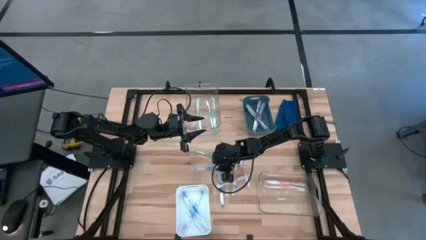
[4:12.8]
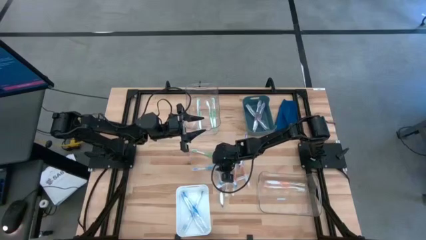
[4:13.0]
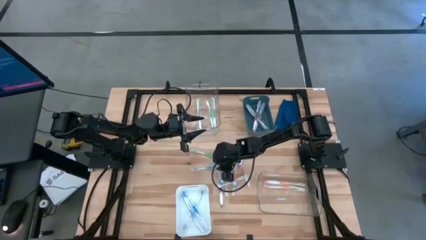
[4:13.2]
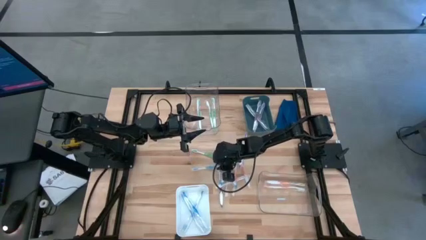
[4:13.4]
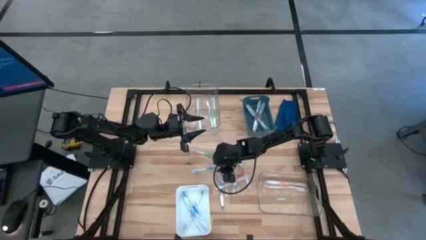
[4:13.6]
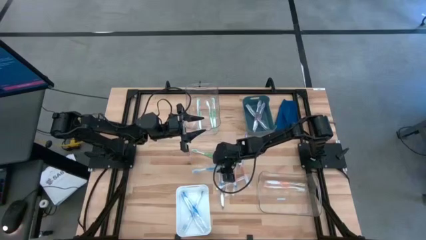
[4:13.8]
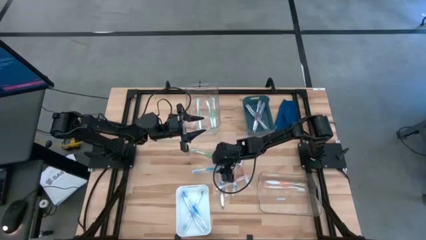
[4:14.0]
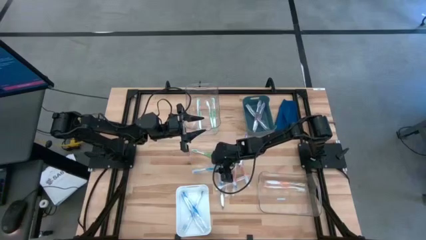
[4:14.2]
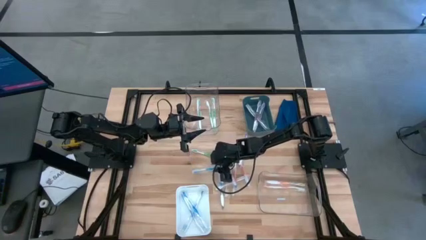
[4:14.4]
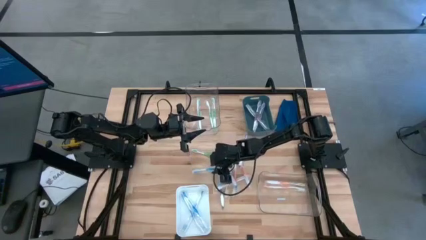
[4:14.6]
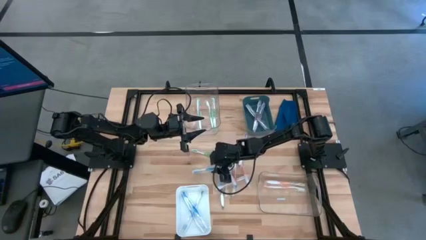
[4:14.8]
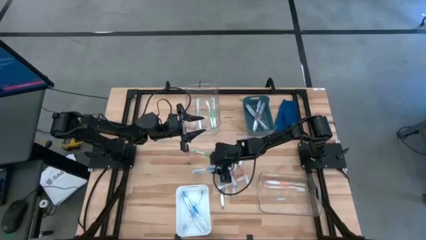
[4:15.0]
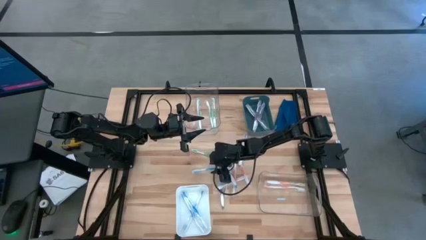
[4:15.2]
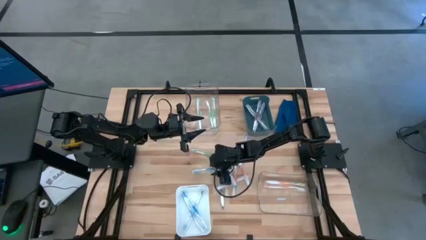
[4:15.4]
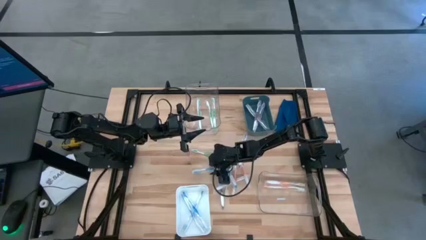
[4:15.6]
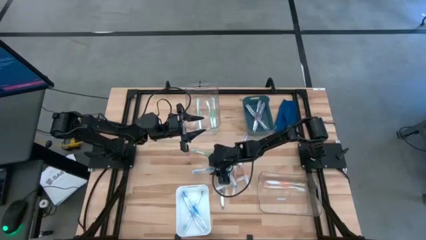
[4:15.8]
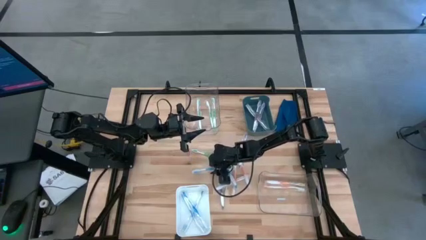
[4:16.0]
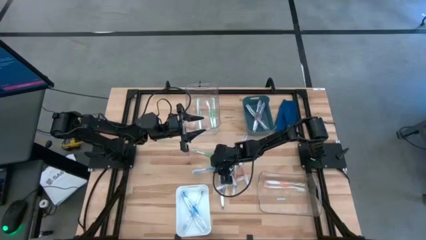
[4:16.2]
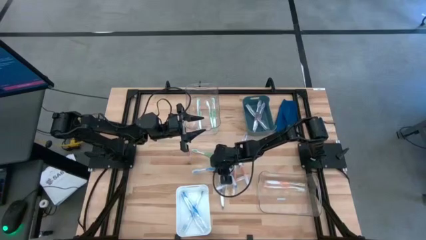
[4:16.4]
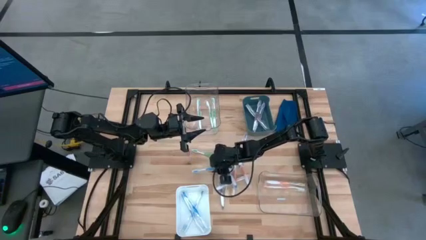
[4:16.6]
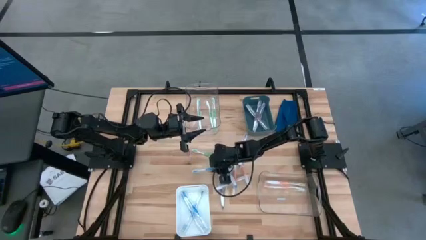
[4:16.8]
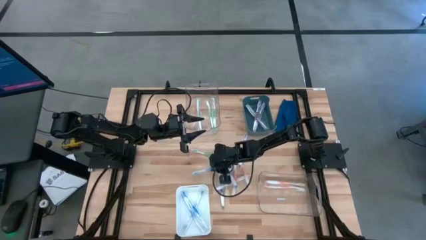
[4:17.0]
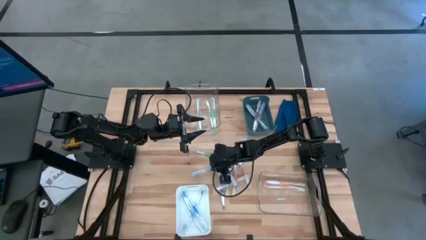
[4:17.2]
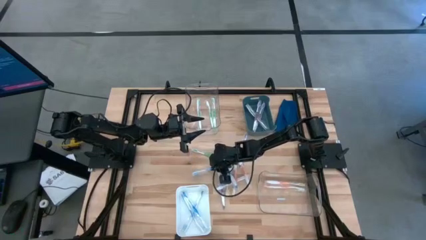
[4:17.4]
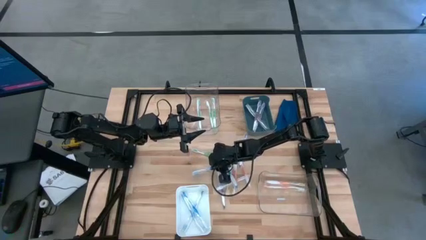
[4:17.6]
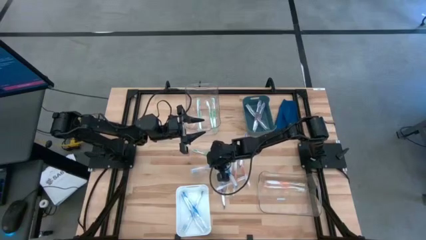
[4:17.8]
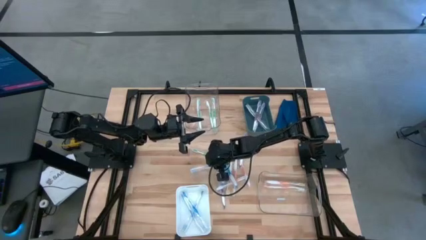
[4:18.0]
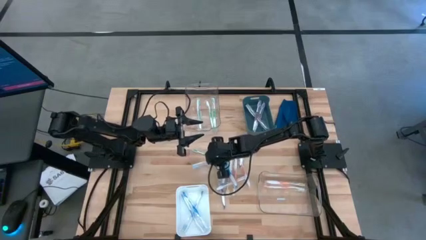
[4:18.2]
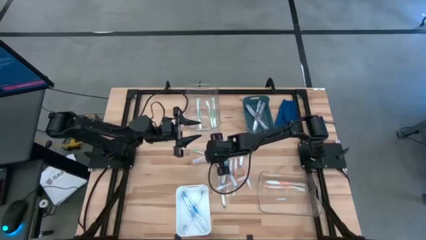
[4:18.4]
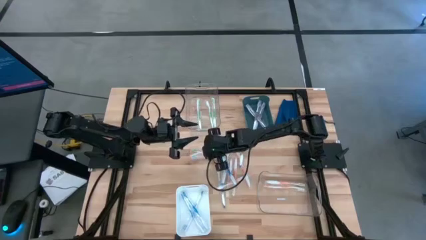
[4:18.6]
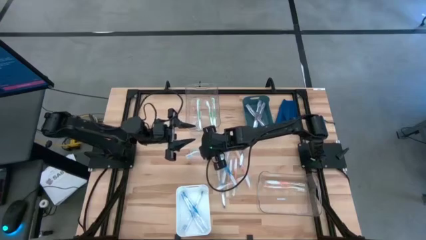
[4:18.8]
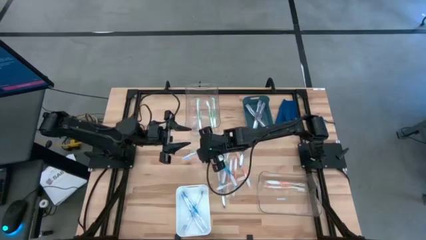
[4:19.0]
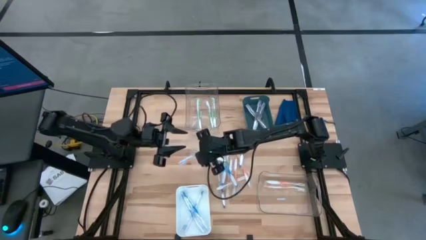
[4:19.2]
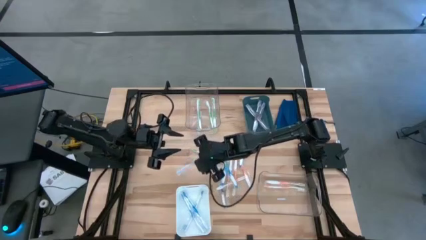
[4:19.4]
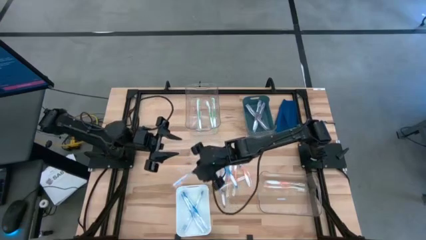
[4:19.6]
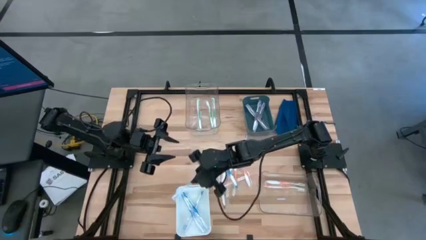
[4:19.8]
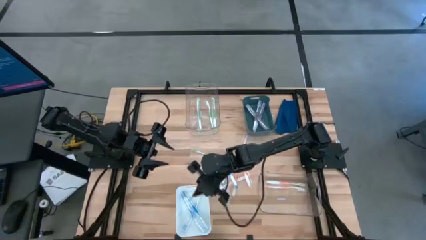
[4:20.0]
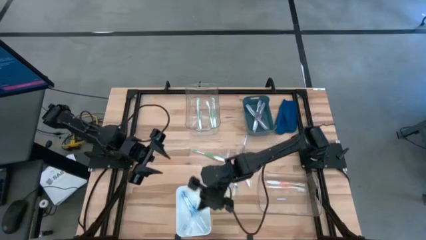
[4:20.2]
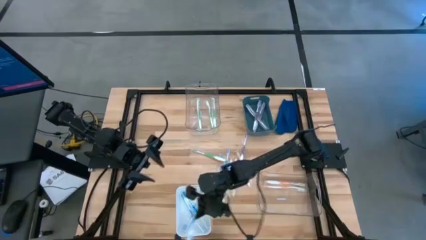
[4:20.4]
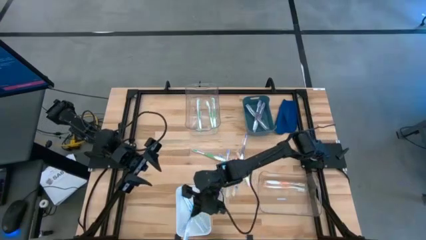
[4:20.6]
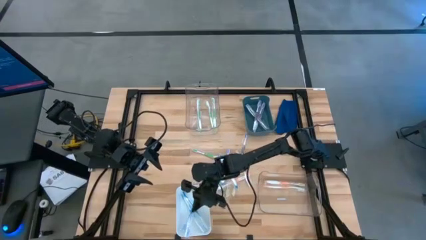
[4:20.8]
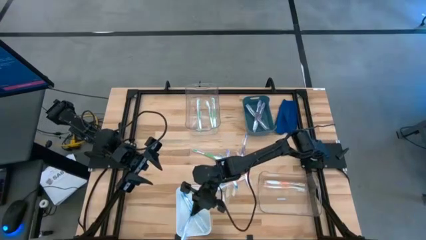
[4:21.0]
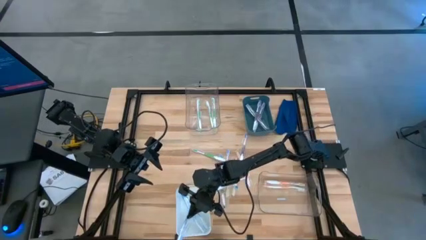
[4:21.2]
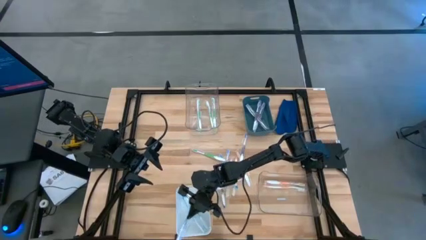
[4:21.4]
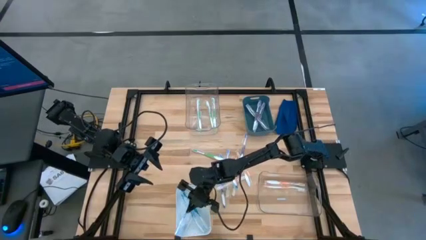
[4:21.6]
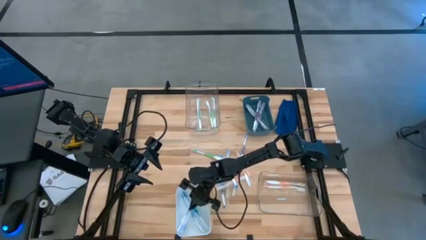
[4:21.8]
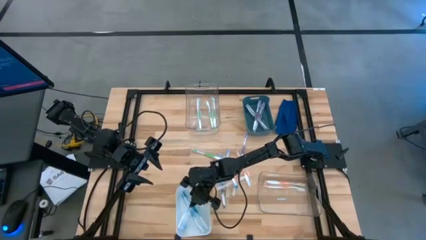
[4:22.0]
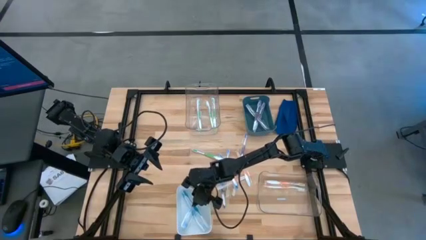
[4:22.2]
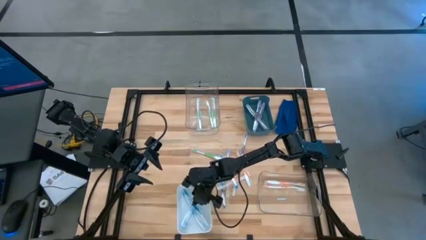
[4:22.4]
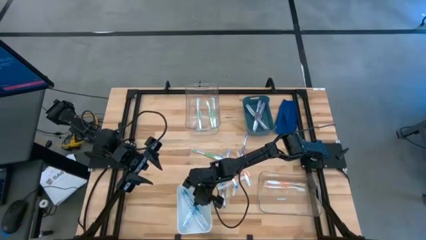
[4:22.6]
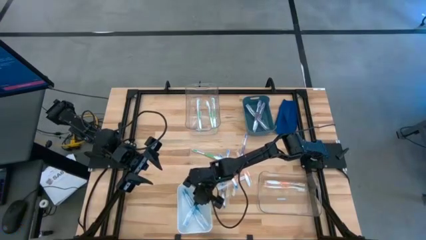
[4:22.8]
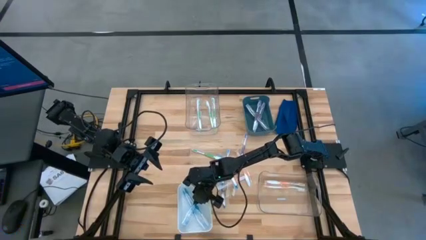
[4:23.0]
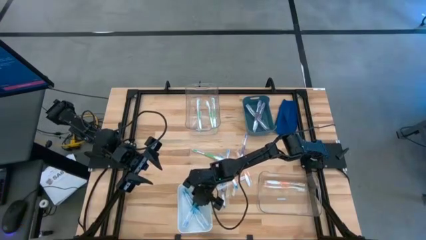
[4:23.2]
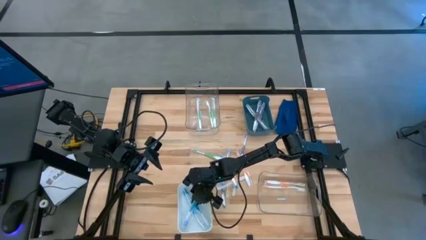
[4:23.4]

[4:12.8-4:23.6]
Task: Pick & Place Toothbrushes
Put the blue toothbrush into the white bin

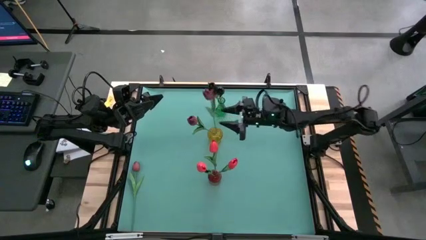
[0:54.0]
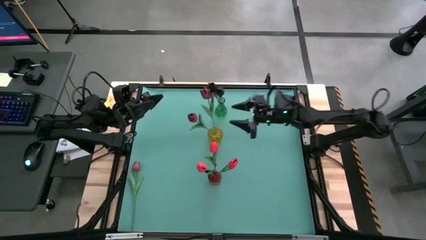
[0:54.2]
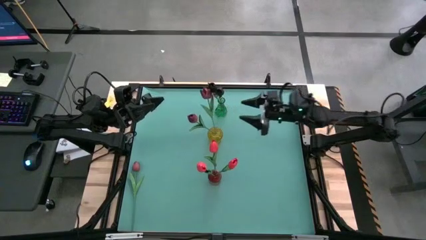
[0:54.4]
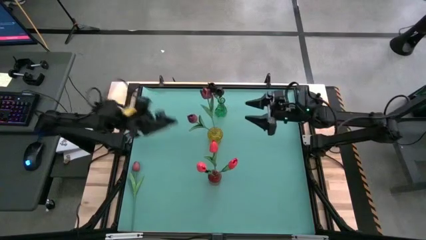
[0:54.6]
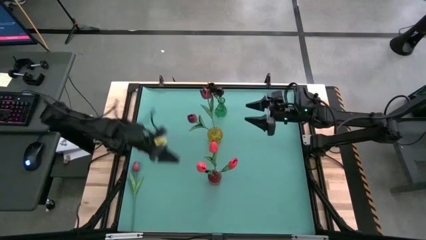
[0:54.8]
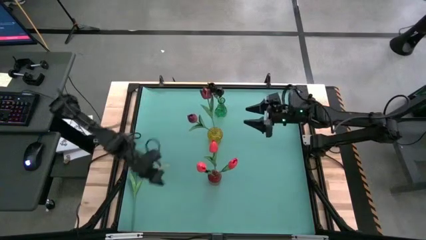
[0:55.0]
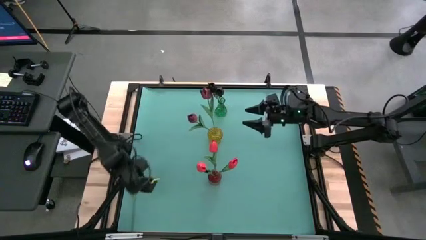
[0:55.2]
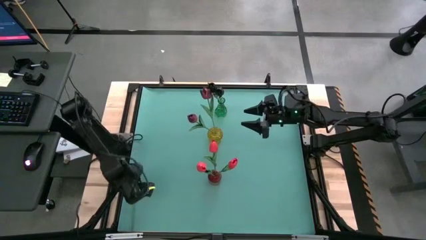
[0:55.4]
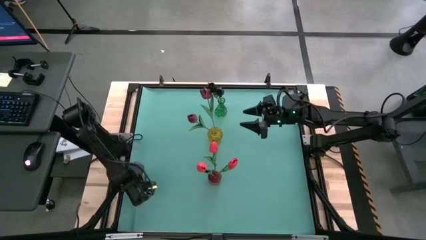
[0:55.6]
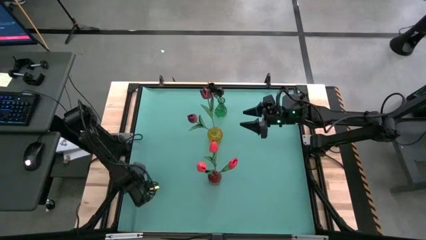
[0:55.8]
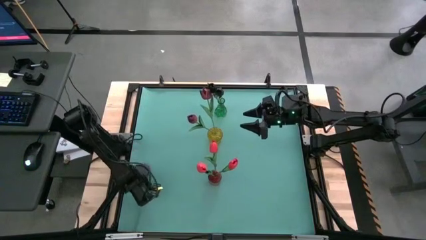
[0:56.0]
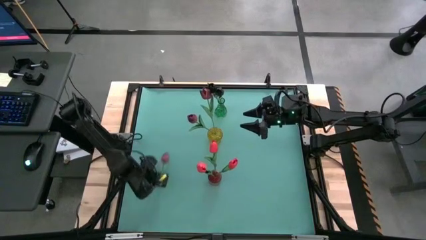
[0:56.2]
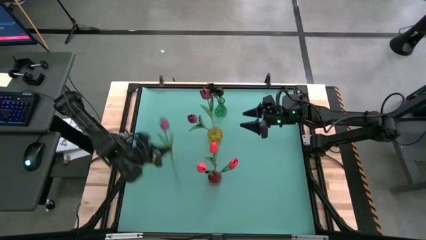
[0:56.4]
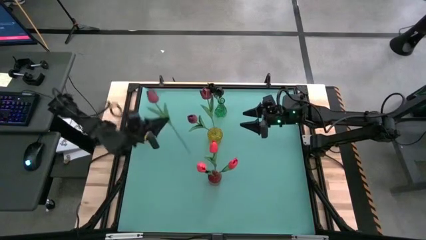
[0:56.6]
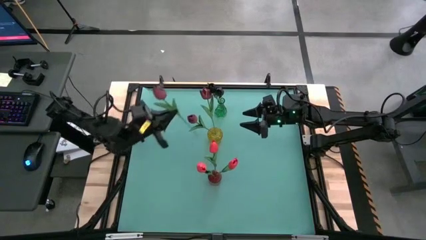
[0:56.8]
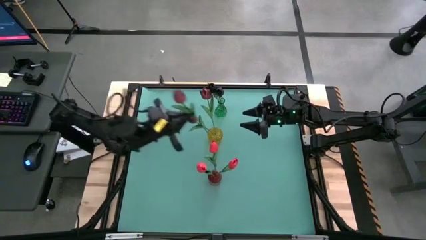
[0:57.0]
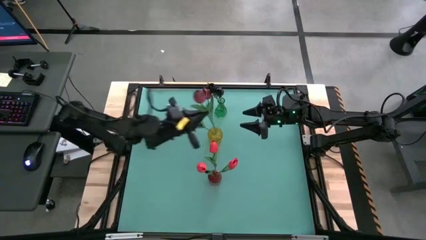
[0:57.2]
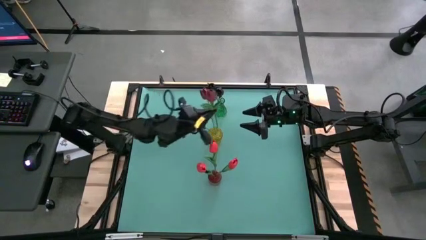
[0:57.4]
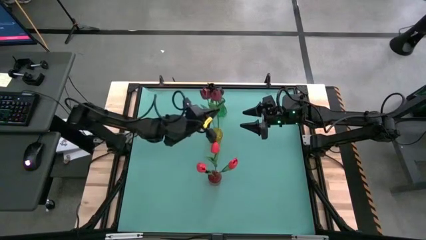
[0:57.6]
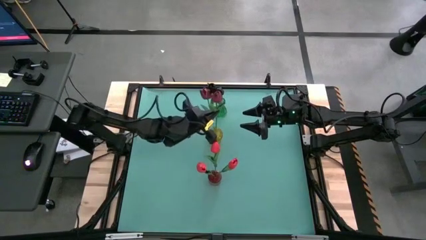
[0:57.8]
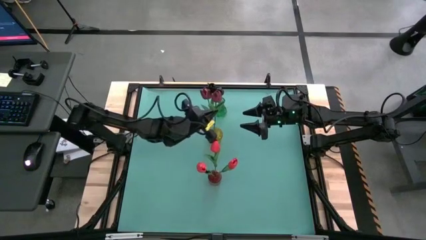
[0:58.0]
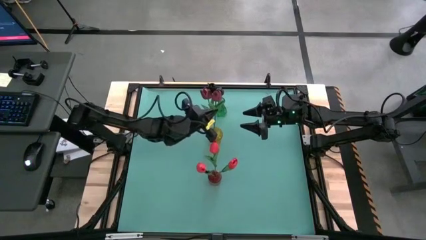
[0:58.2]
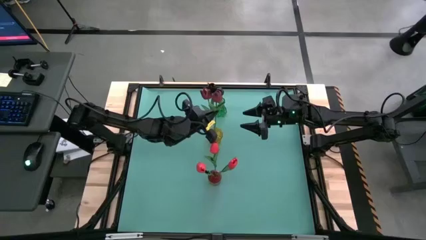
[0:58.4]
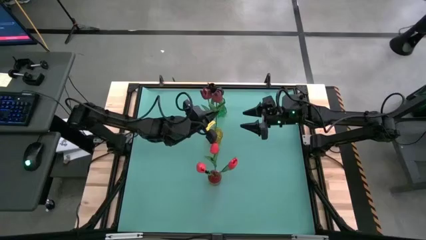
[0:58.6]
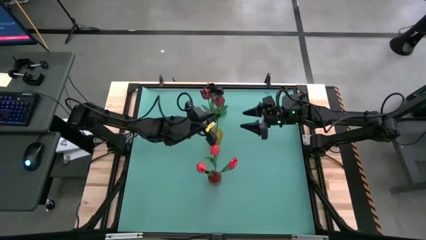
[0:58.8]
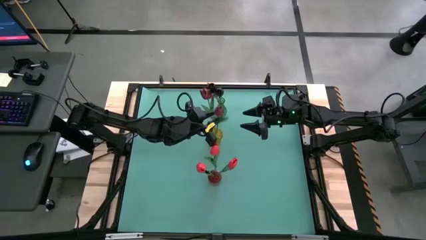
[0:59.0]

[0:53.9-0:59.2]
Task: Sort flowers into vase by color
Put the red flower into the yellow flower vase
